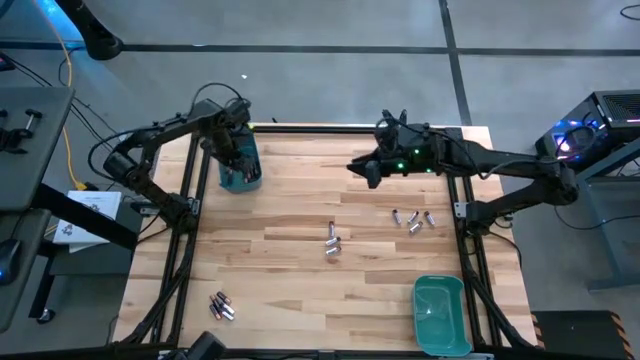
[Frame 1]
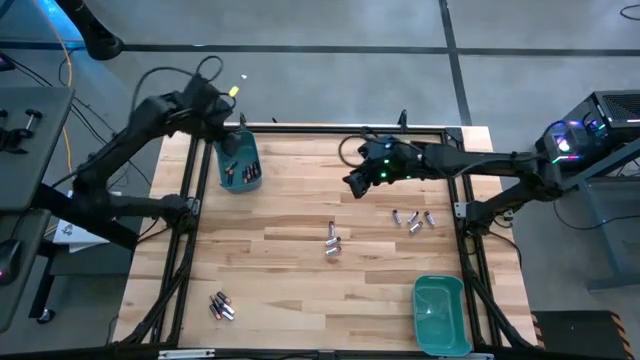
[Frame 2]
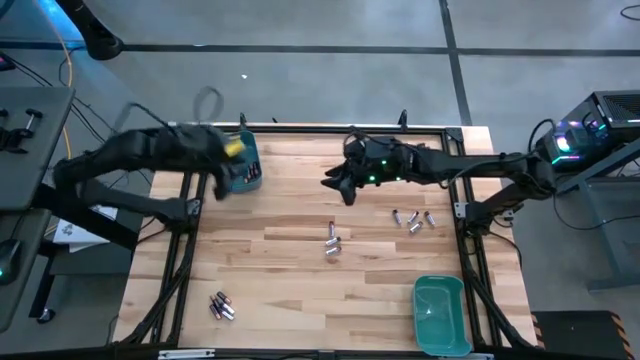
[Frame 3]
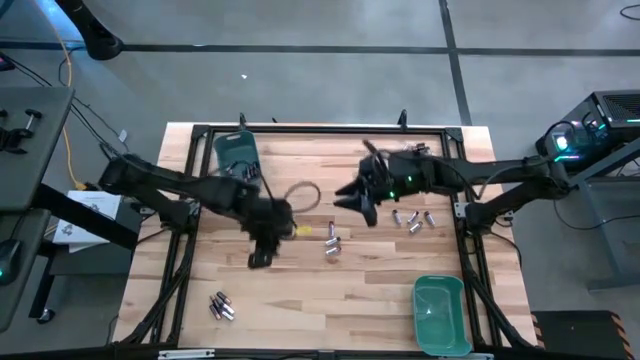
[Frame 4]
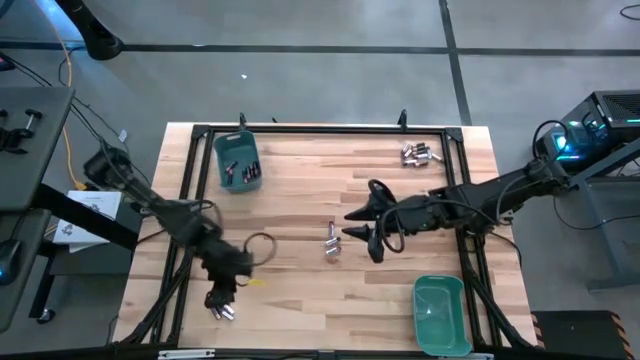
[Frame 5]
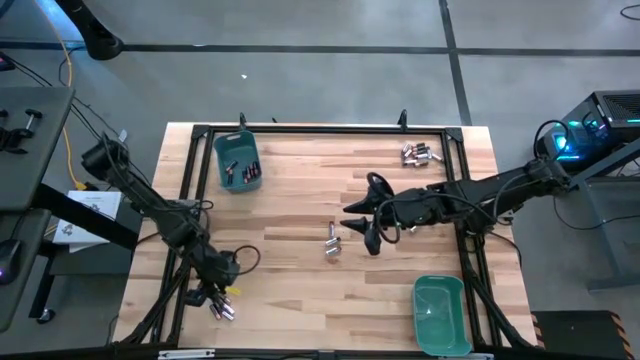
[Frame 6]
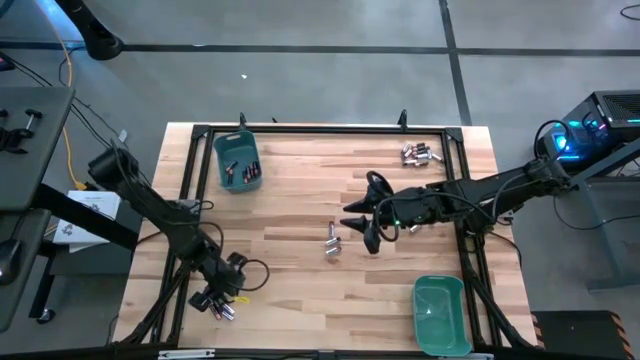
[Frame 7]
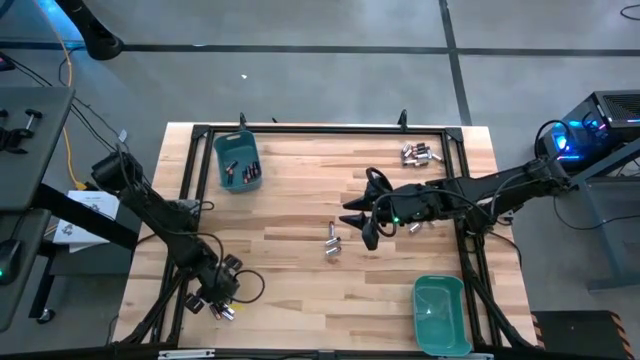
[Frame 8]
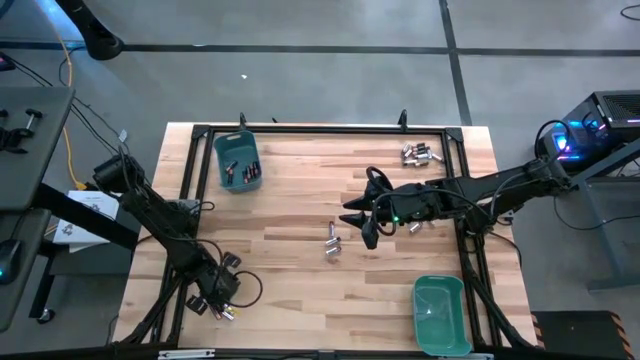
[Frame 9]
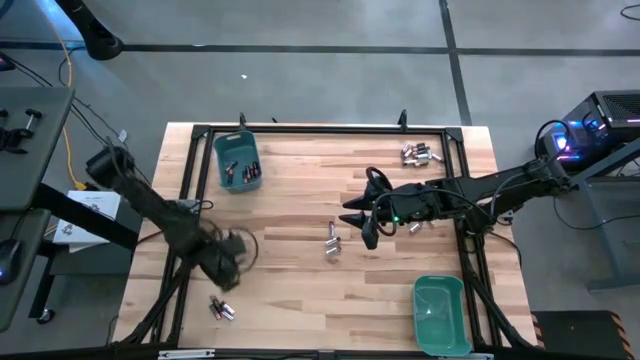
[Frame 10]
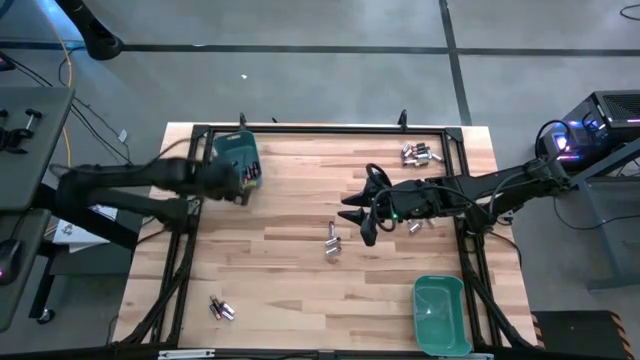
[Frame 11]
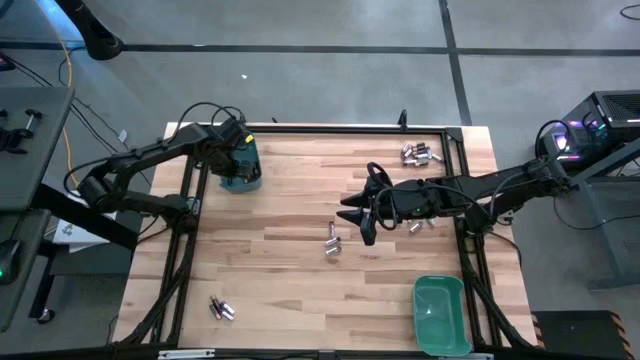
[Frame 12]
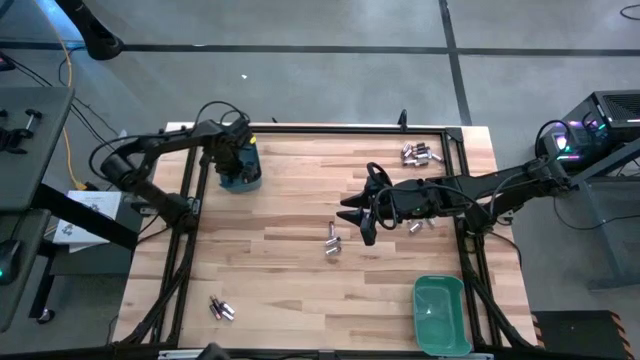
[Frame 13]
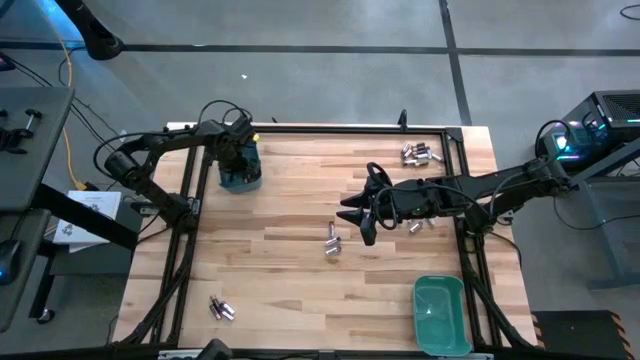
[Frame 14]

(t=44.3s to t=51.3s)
Task: Sort batteries
Put the black battery into the blue bin

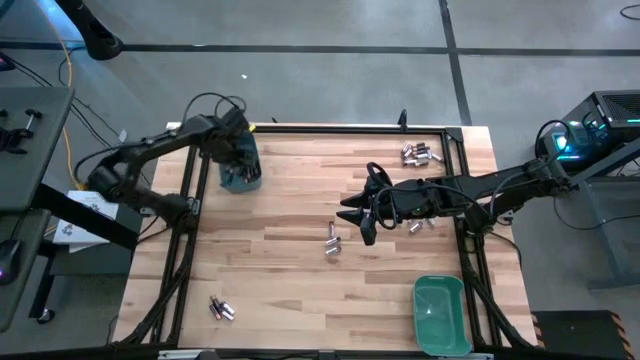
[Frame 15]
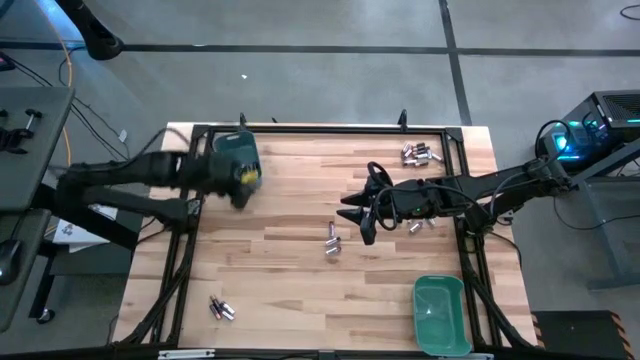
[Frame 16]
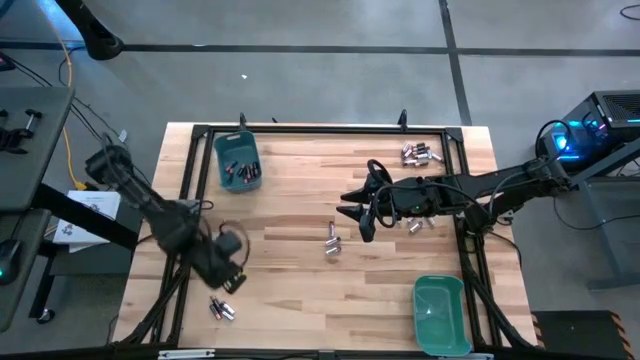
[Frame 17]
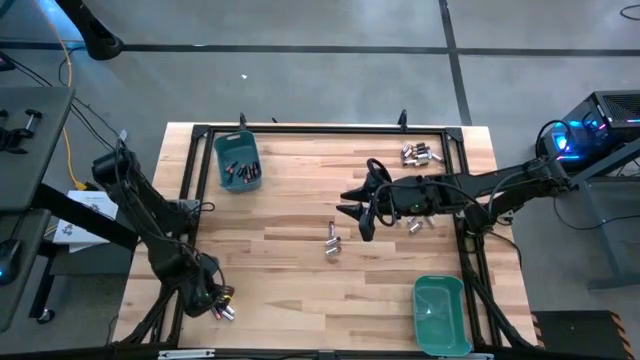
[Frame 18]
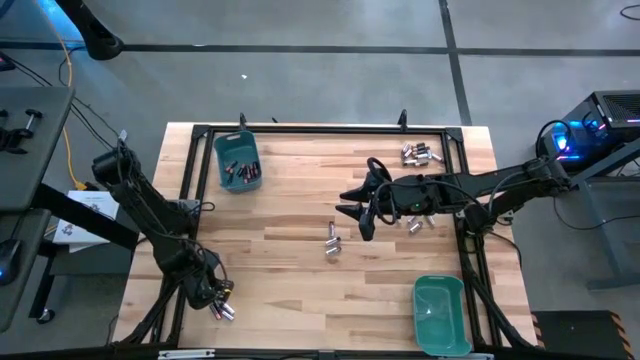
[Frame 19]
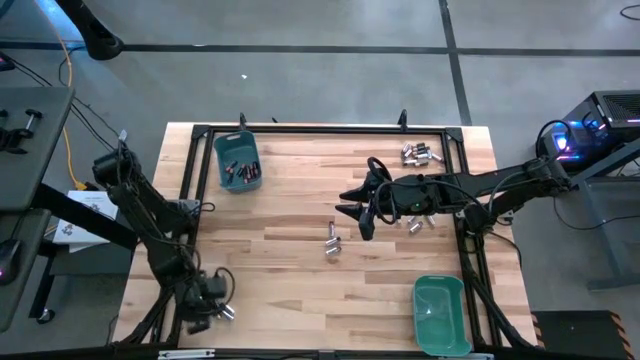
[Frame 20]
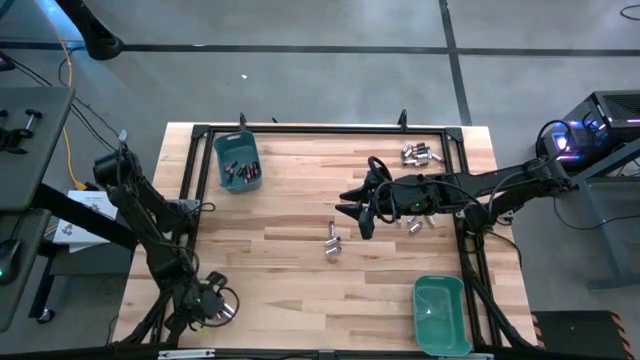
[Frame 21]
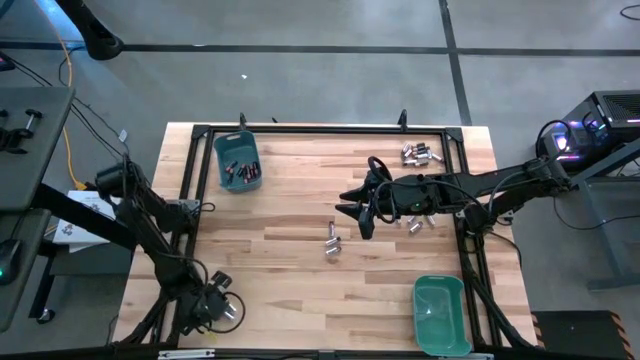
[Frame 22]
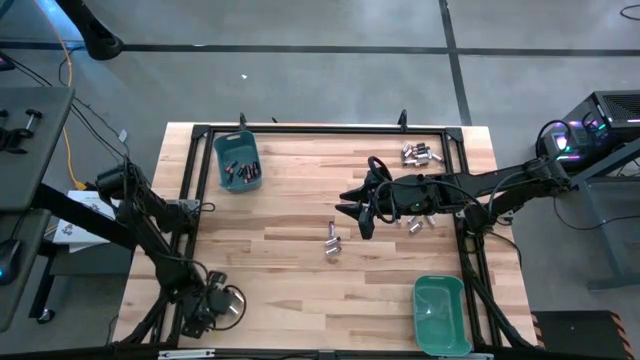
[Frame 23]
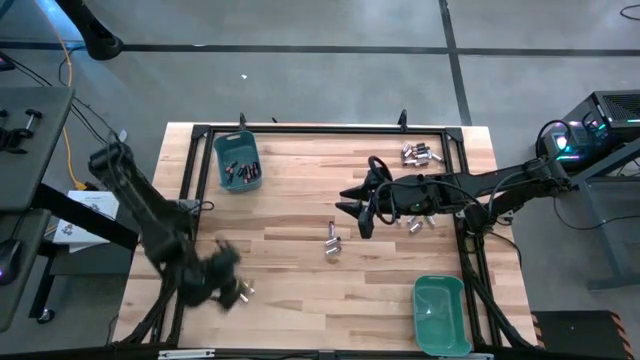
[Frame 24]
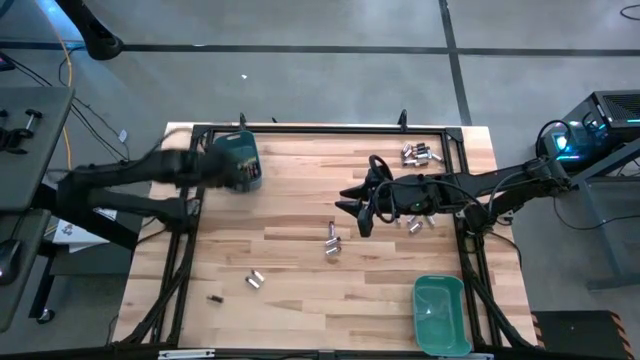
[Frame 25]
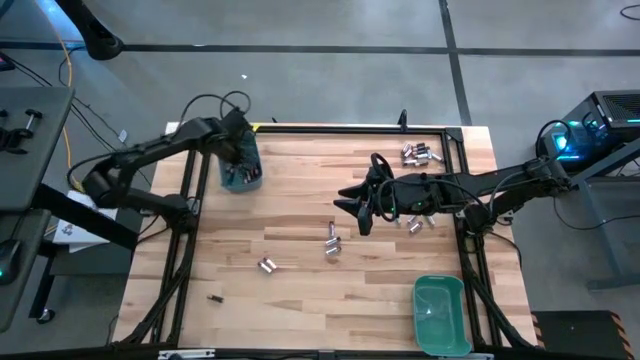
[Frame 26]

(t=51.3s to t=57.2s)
Put the black battery into the blue bin

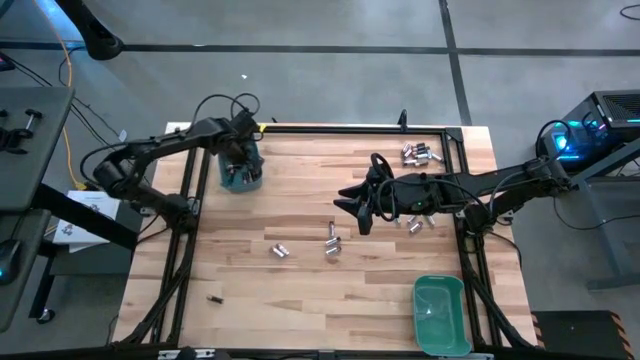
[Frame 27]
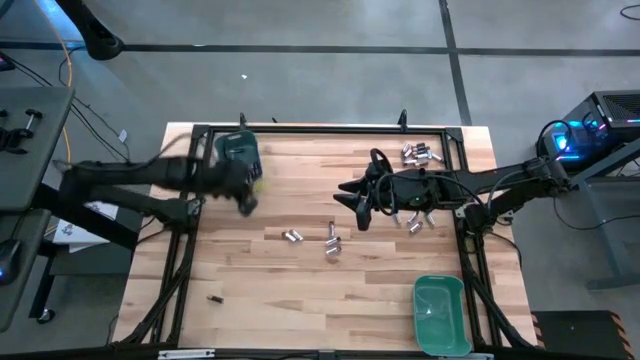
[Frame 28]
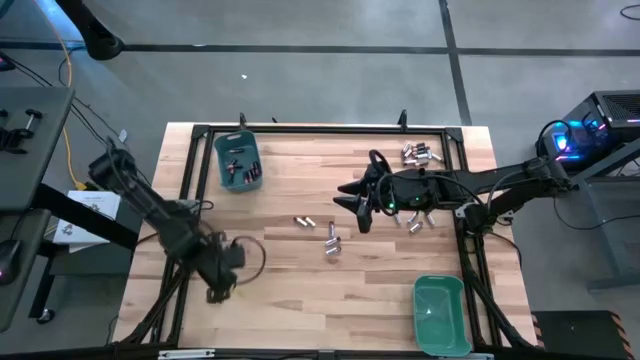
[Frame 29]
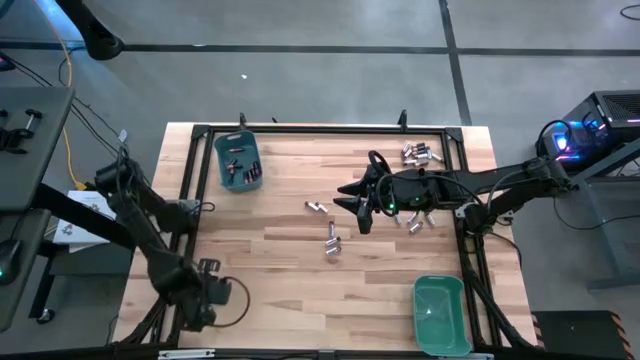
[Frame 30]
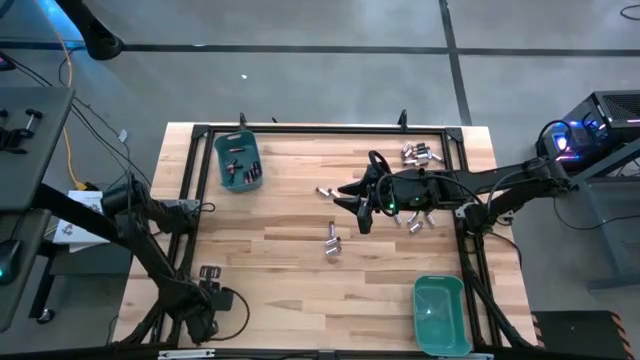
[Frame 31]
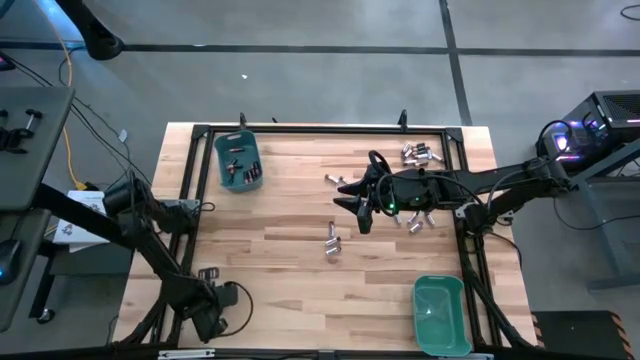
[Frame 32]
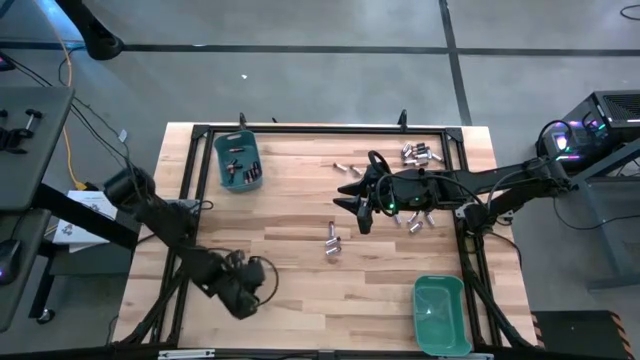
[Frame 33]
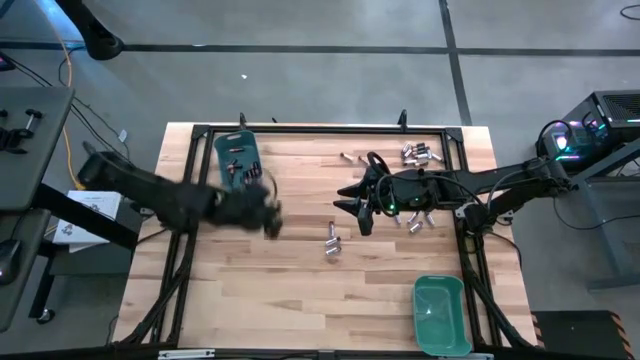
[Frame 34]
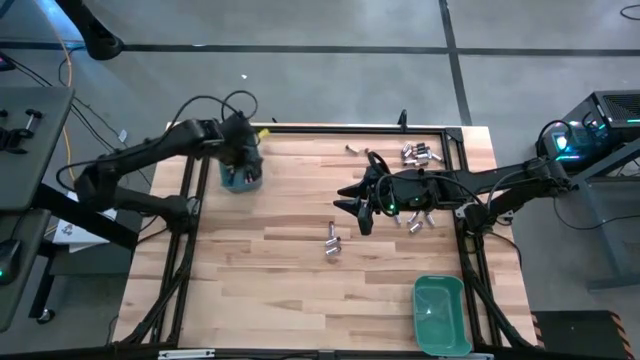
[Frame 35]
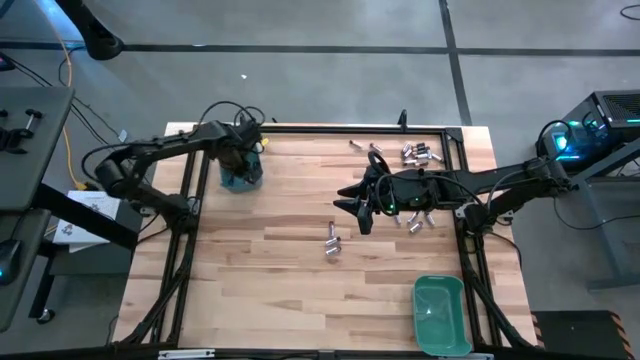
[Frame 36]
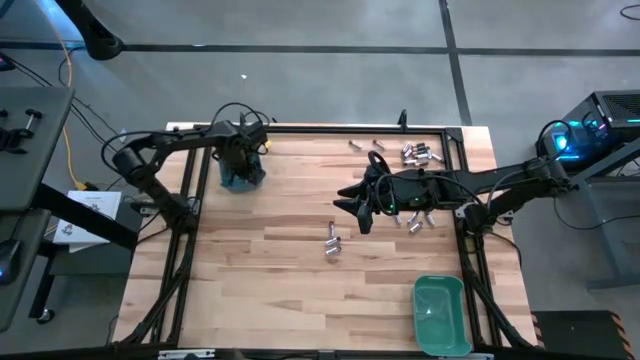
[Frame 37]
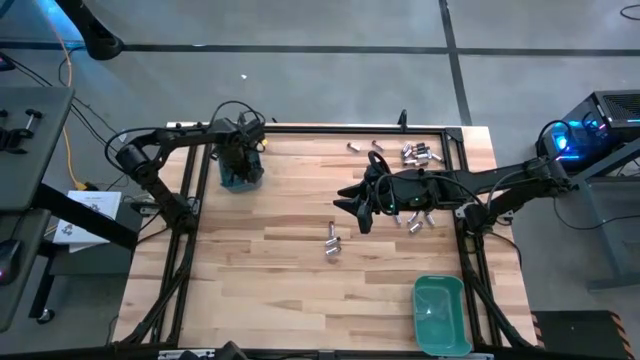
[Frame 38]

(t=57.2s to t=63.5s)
Put the black battery into the blue bin

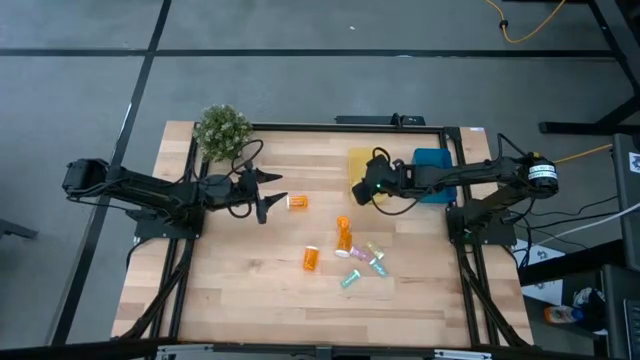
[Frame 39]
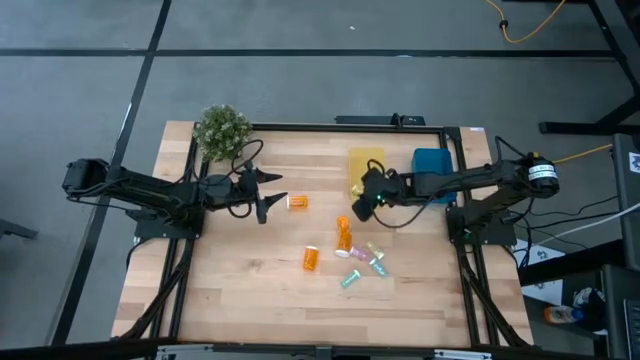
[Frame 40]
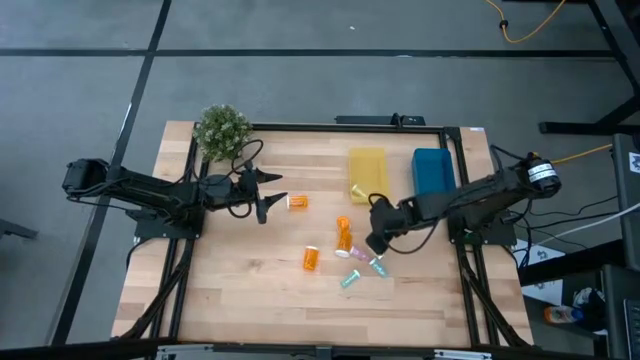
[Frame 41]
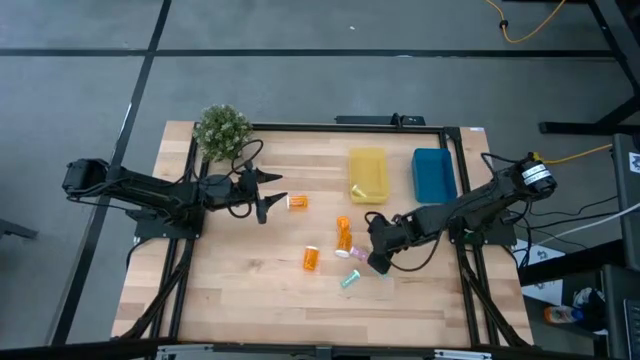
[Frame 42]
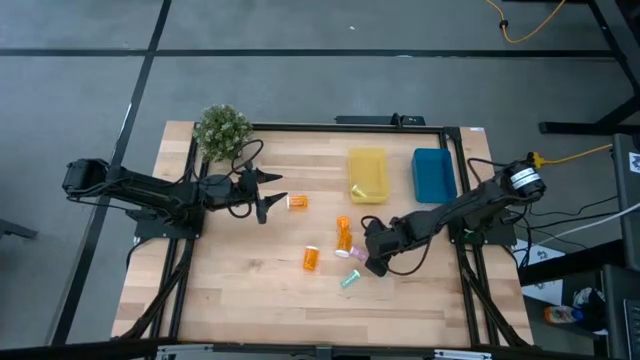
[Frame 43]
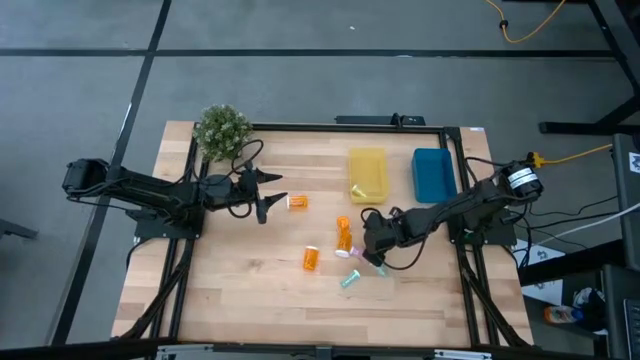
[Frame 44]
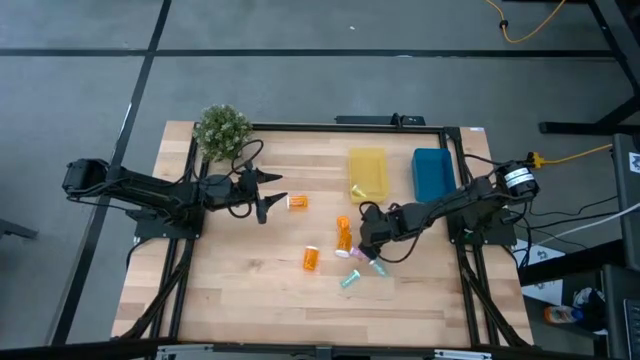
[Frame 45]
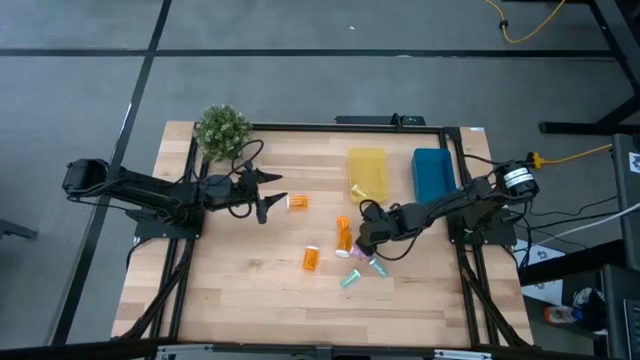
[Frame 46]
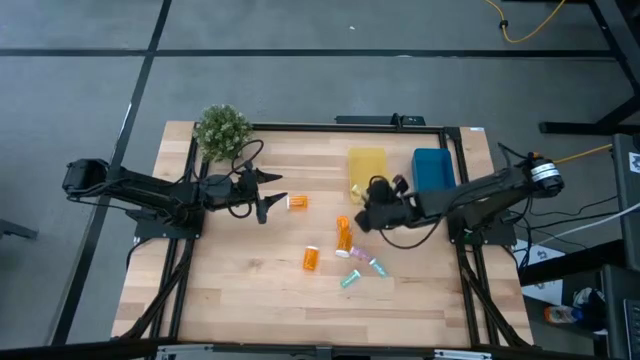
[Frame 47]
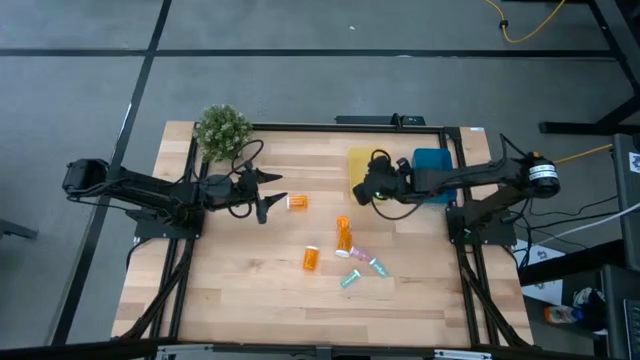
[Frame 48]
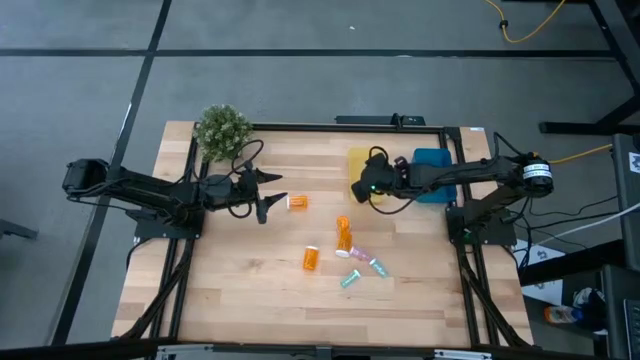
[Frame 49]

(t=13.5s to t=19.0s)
Task: Pick and place medicine bottles into bin by pill shape (circle, oval)
Put the small yellow pill bottle into the yellow bin
